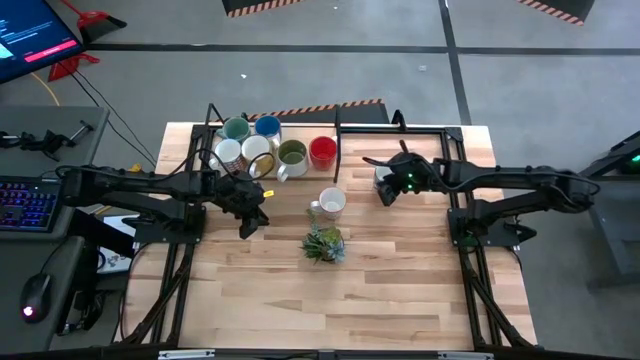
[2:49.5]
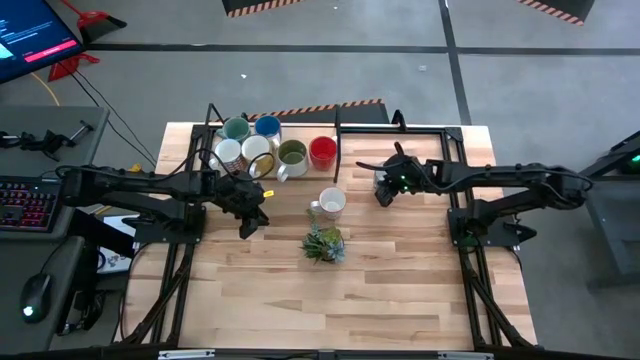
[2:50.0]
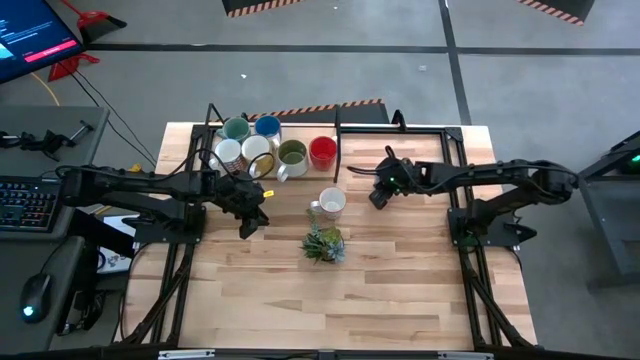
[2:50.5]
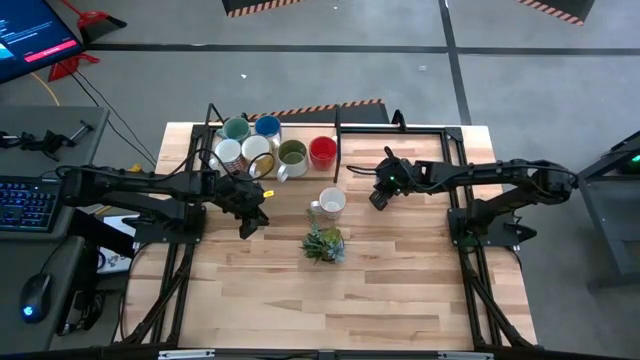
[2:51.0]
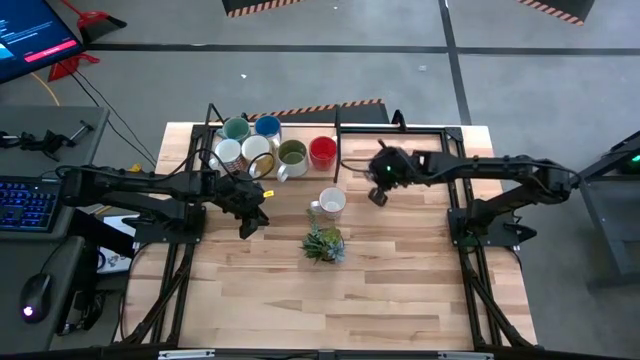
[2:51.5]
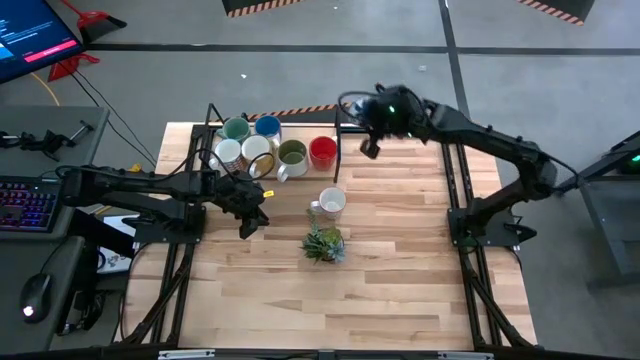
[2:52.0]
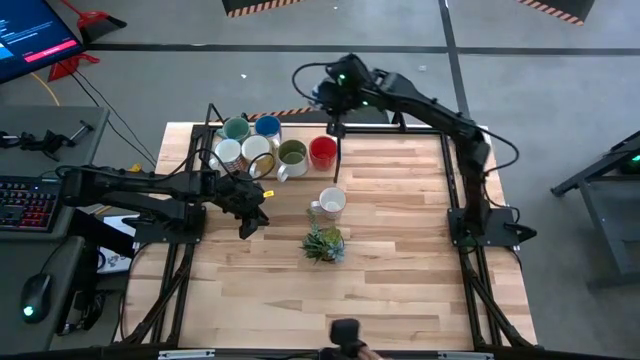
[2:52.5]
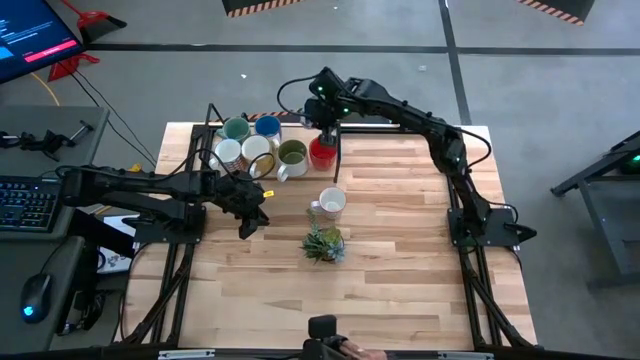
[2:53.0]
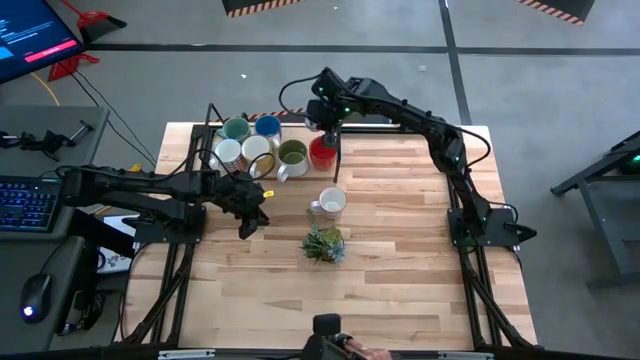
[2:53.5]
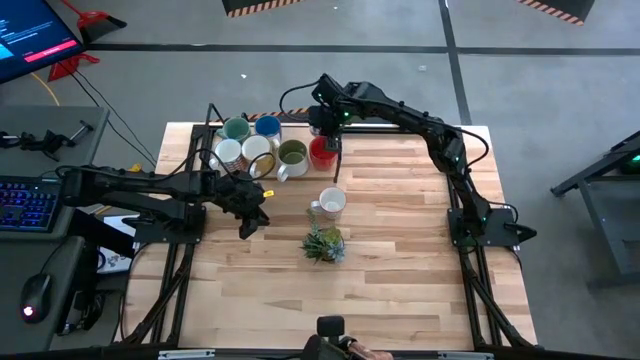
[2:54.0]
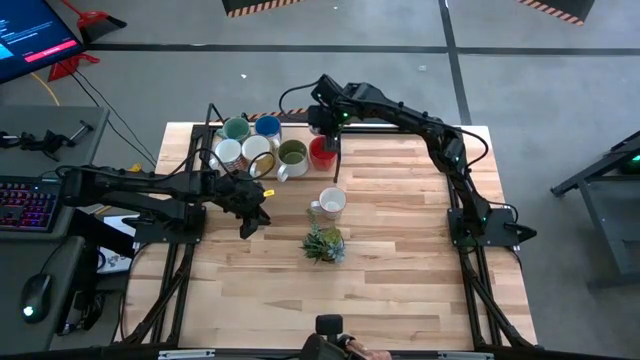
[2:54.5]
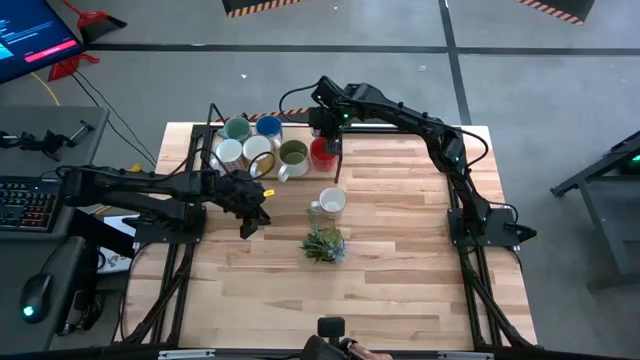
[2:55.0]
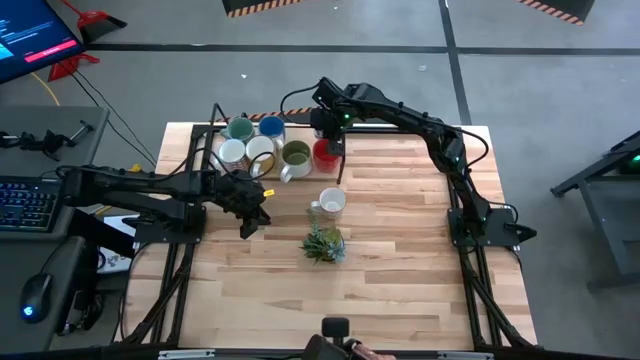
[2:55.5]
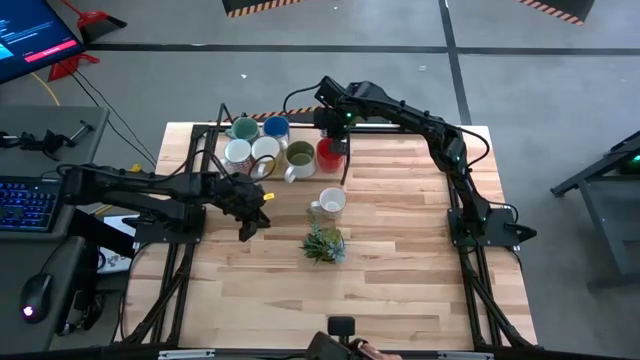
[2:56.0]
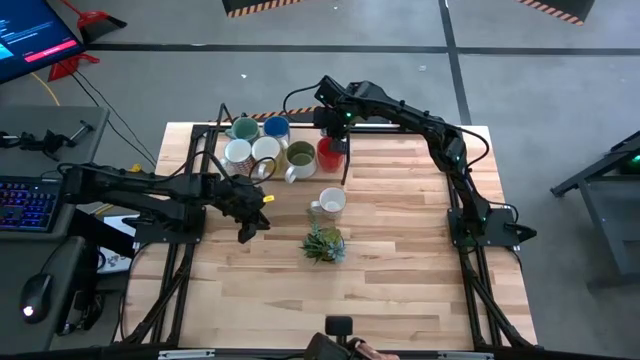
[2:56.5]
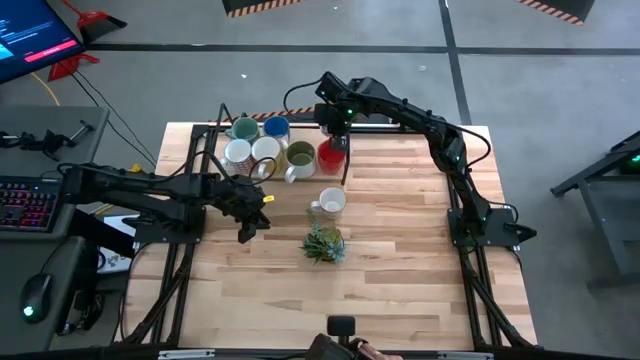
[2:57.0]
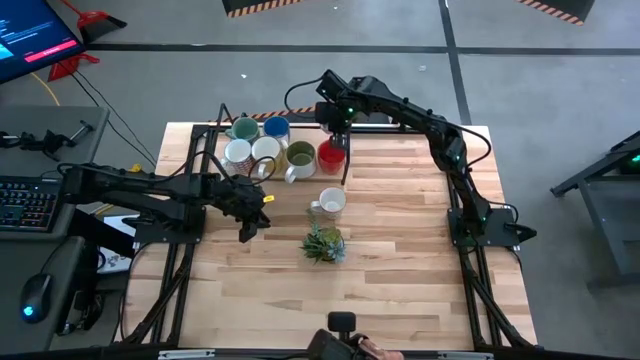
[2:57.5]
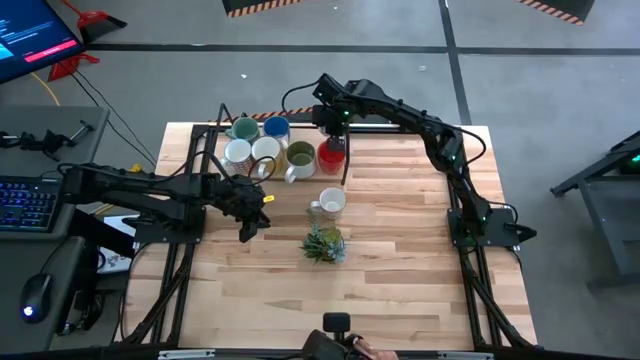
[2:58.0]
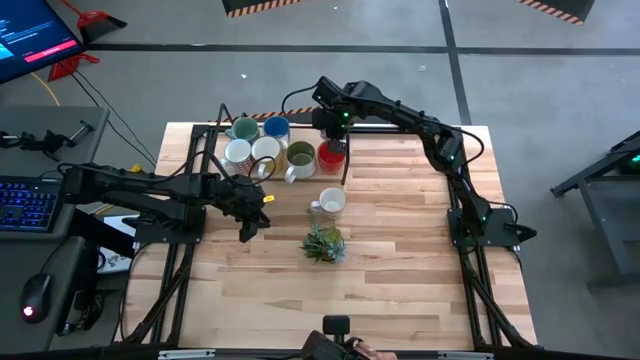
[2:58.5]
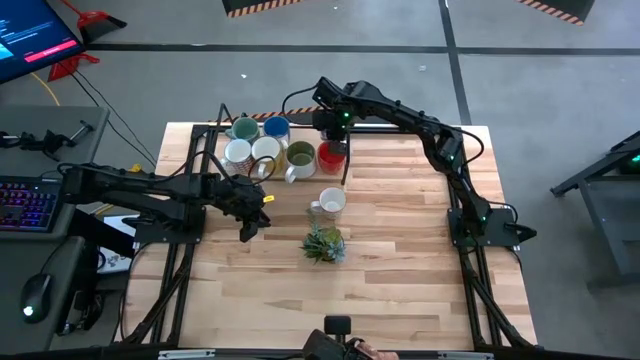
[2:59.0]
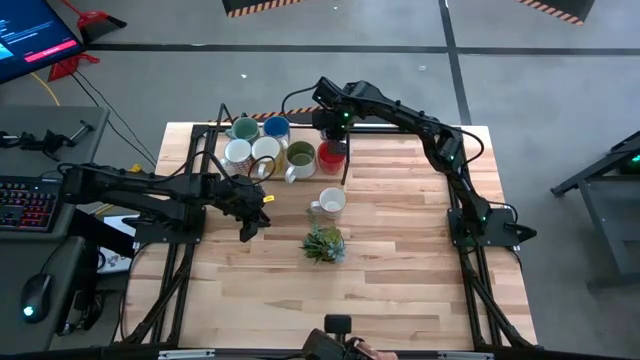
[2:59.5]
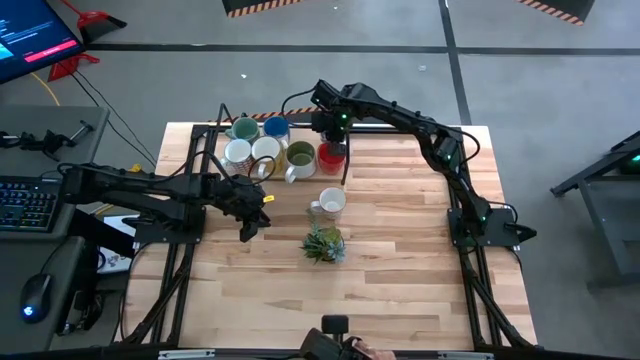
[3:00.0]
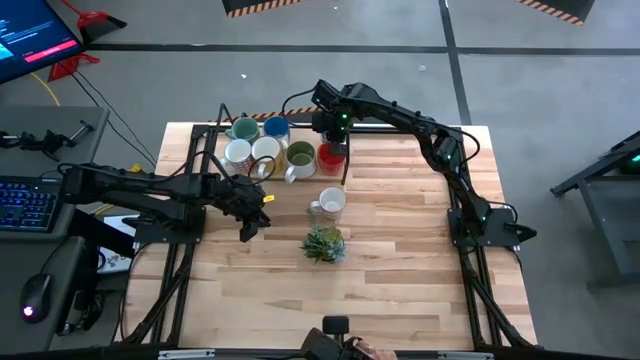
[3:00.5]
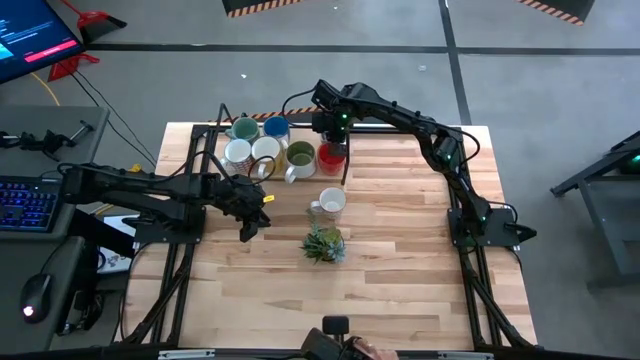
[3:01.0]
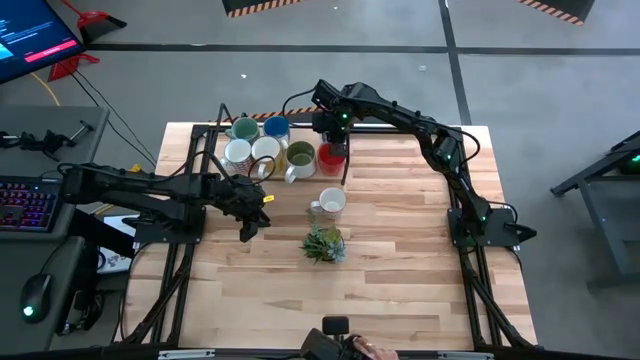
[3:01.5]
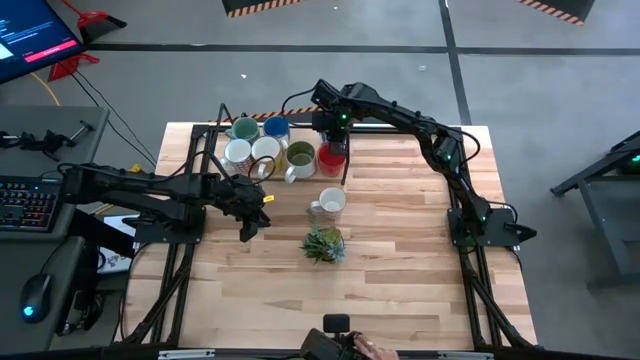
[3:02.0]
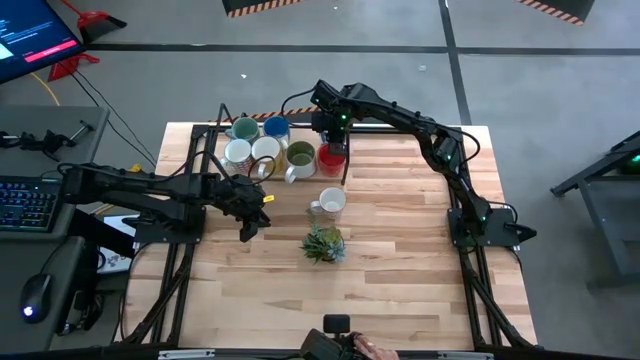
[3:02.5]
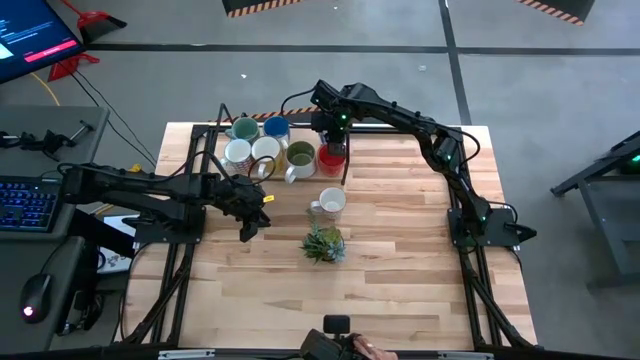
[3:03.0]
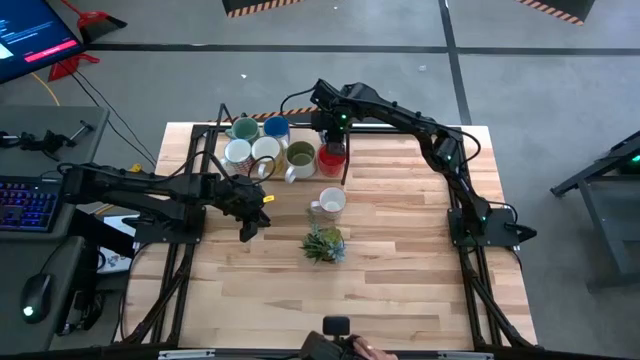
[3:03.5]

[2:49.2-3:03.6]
Task: Place coffee mugs
Put the blue patterned mug on the shelf

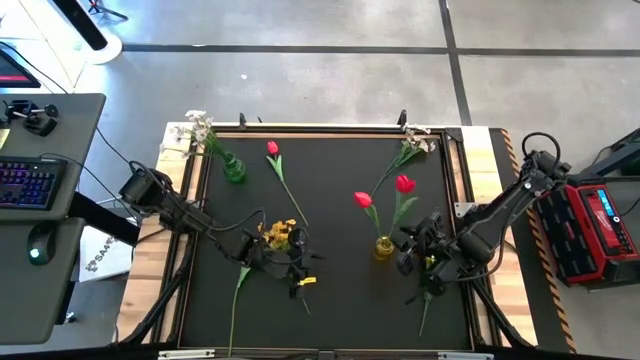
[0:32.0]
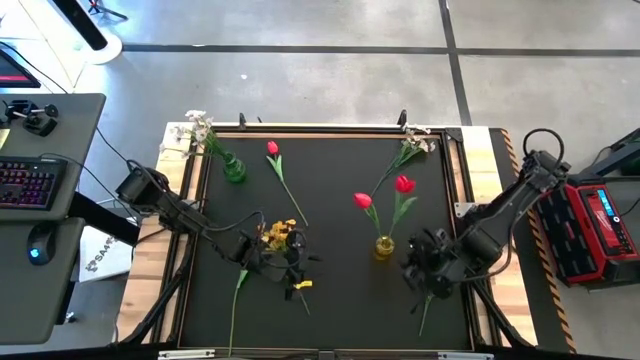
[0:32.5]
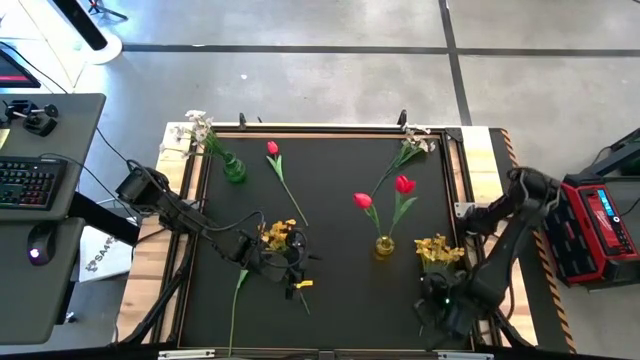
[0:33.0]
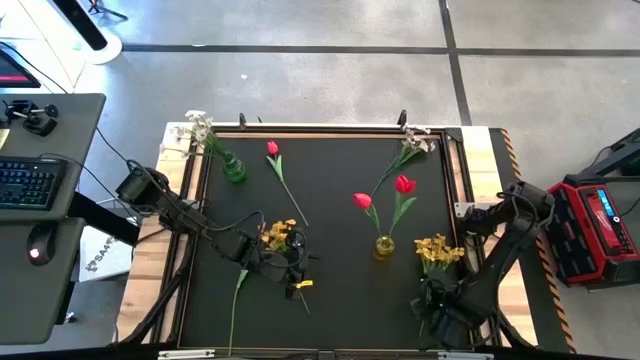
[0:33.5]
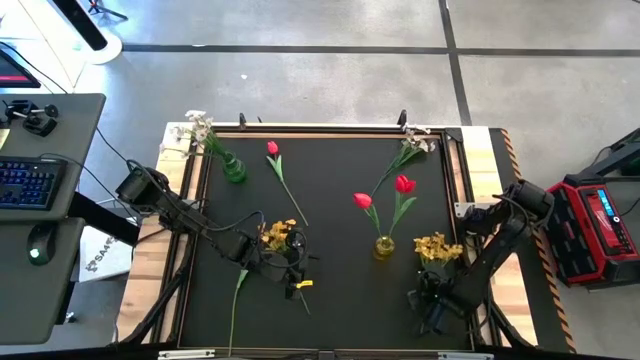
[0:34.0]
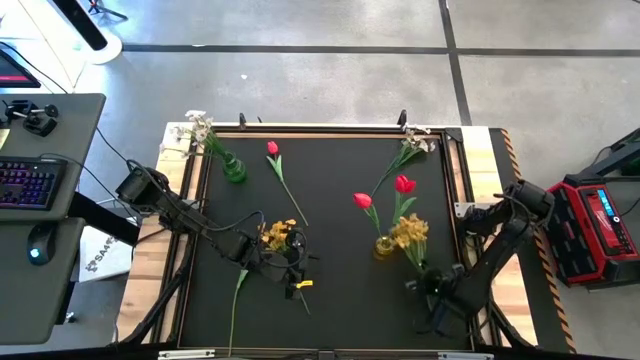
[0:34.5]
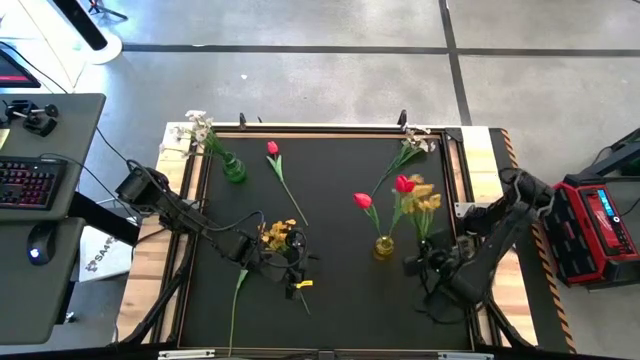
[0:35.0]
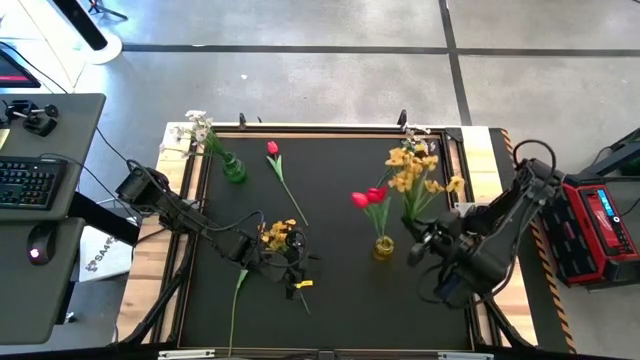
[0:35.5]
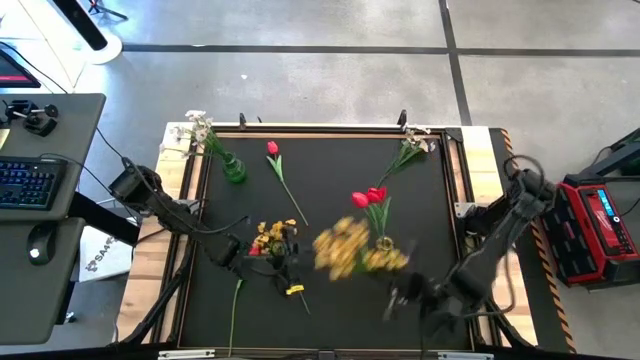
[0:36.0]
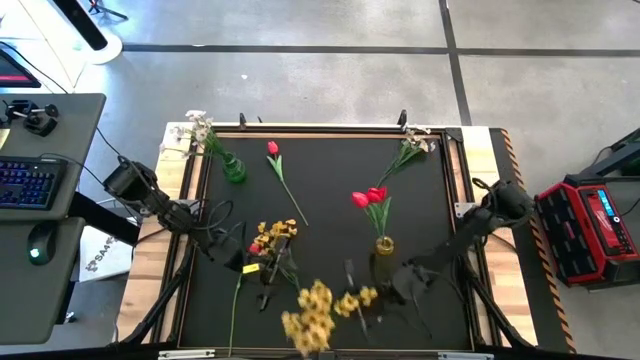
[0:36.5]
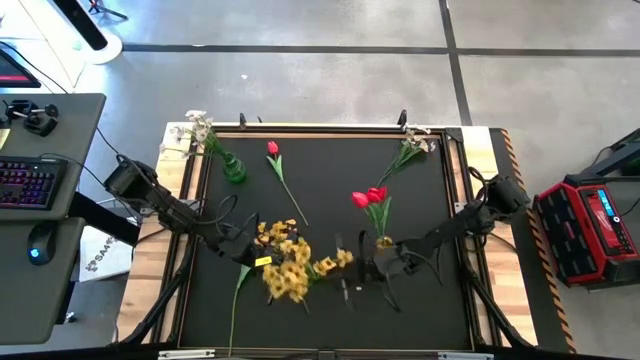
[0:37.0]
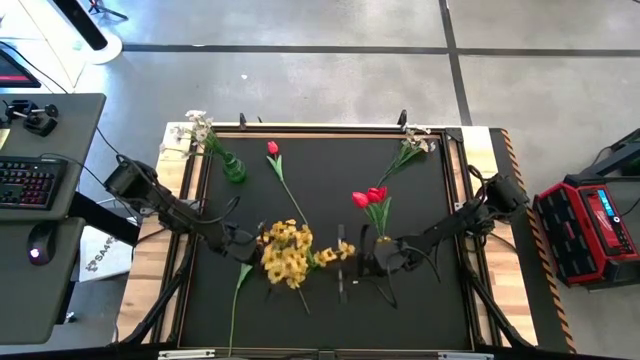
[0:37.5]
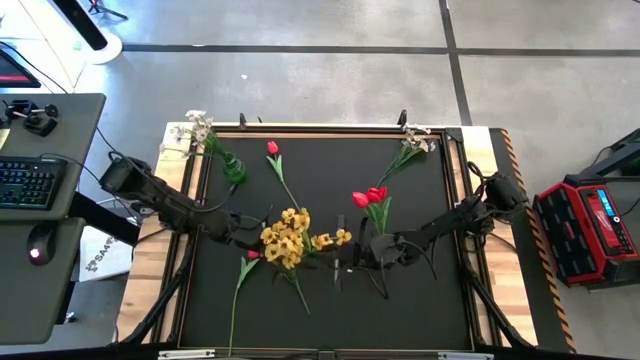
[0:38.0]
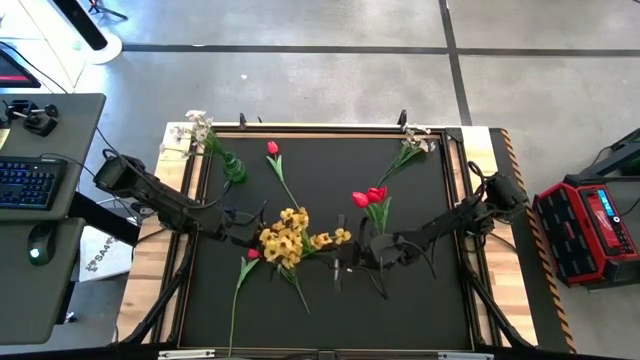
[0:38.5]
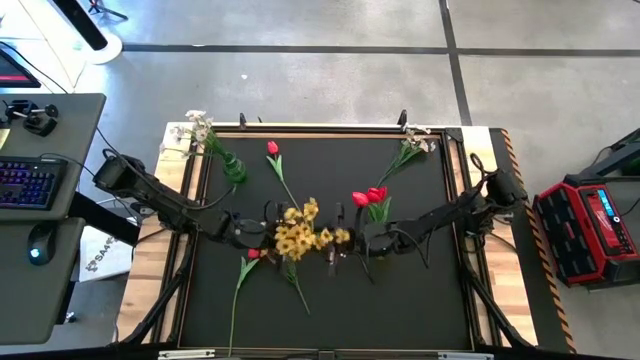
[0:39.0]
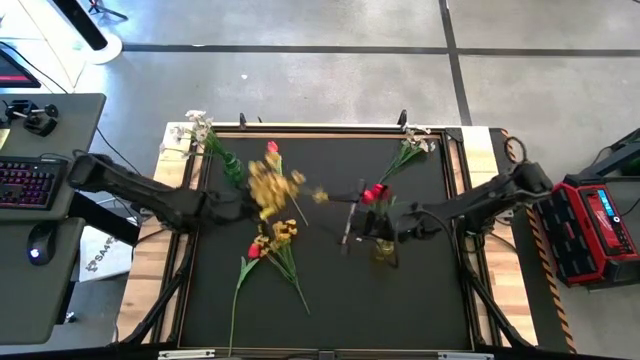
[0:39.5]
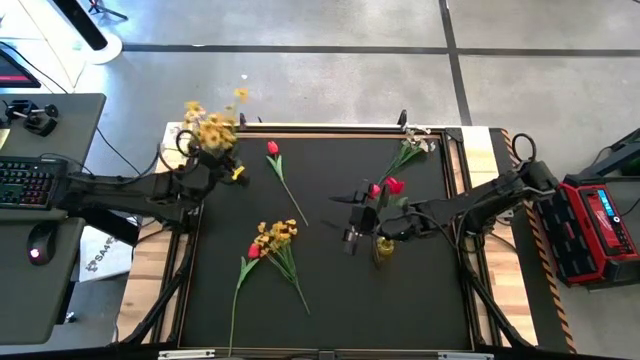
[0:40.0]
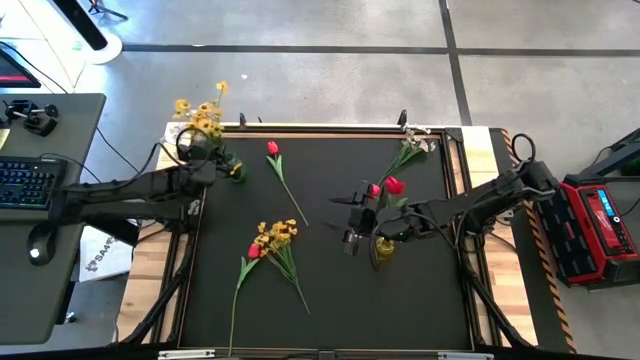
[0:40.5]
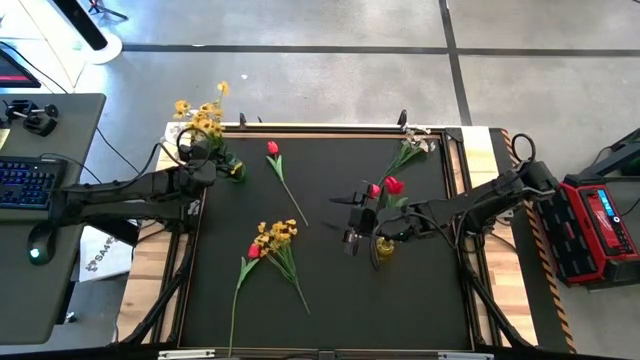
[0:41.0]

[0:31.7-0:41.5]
Task: Sort flowers into vase by color
Put the right yellow clustered flowers into the green flower vase
